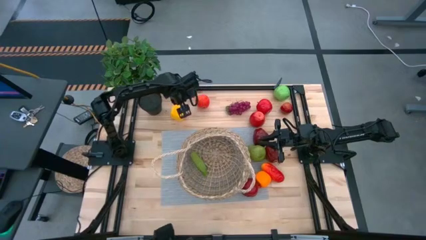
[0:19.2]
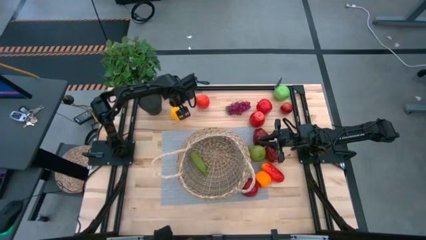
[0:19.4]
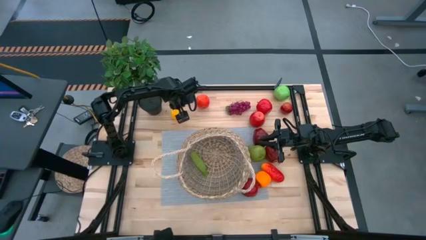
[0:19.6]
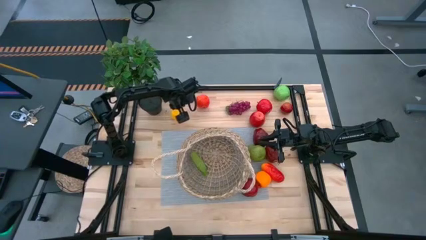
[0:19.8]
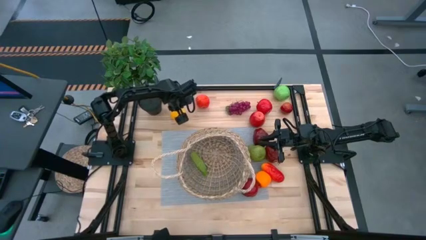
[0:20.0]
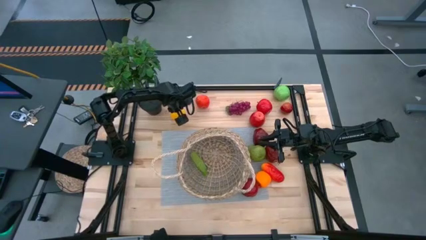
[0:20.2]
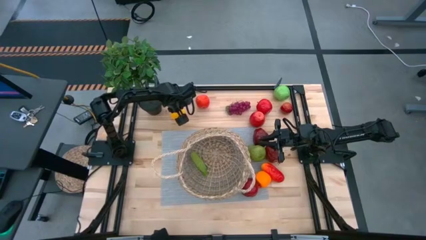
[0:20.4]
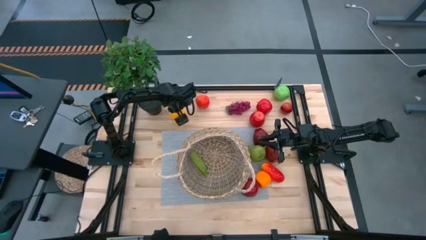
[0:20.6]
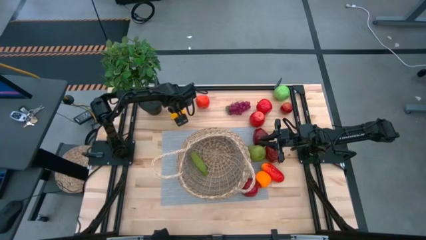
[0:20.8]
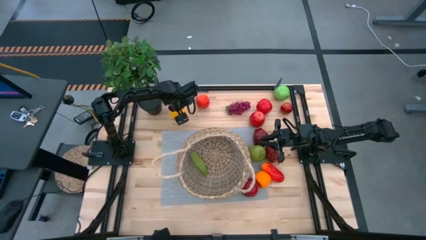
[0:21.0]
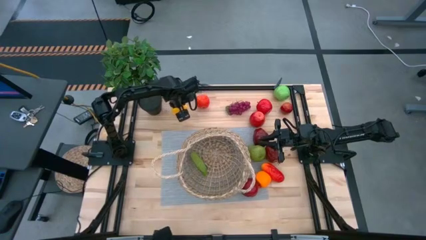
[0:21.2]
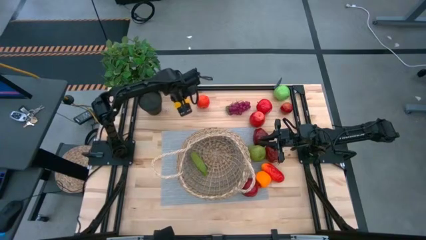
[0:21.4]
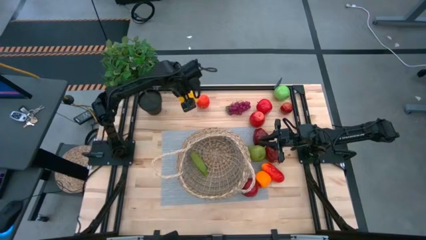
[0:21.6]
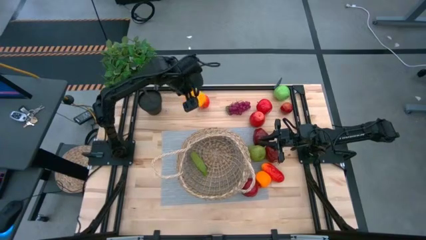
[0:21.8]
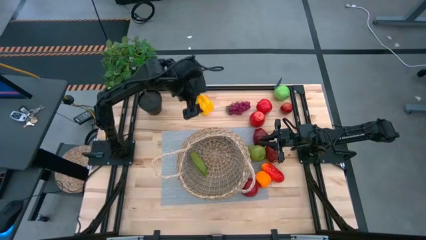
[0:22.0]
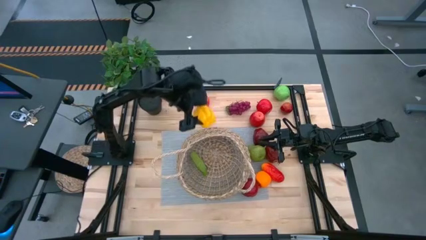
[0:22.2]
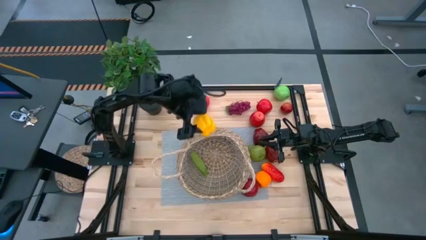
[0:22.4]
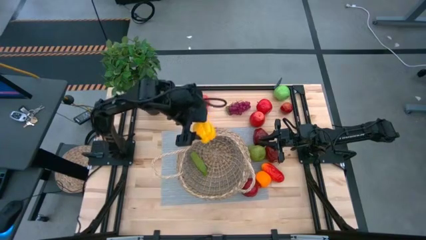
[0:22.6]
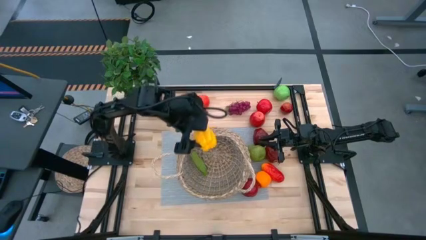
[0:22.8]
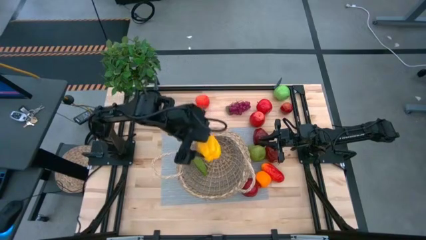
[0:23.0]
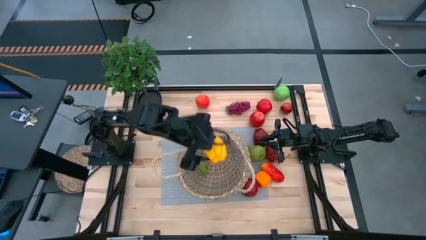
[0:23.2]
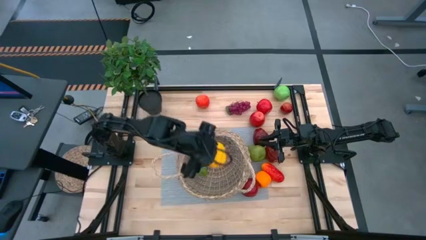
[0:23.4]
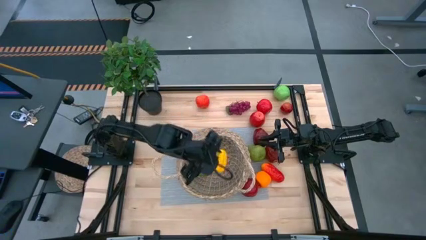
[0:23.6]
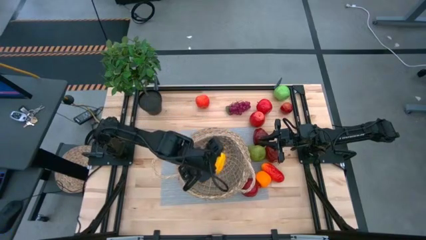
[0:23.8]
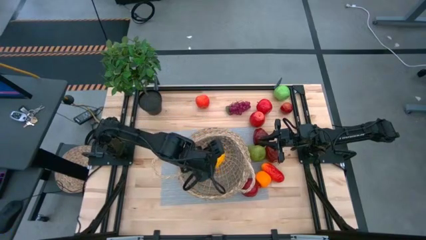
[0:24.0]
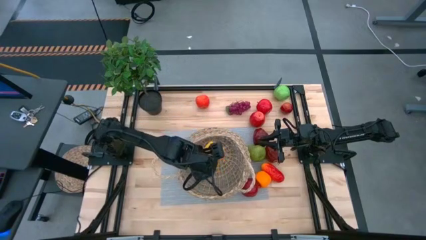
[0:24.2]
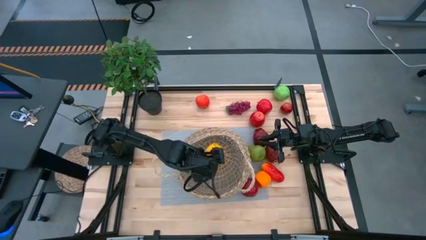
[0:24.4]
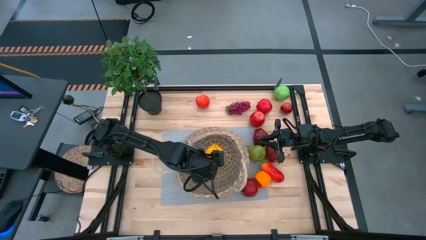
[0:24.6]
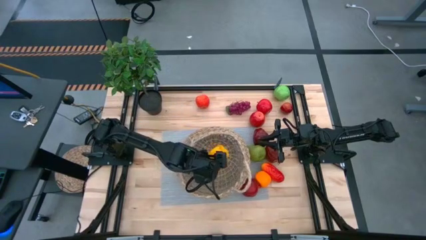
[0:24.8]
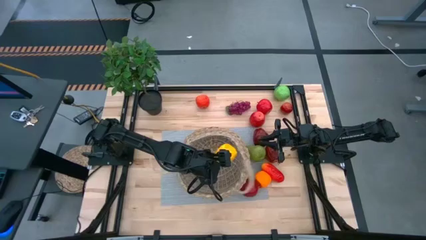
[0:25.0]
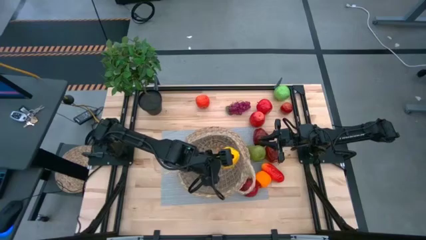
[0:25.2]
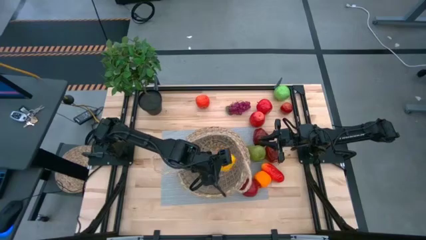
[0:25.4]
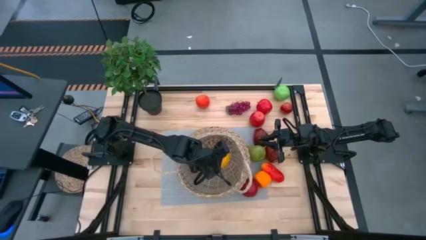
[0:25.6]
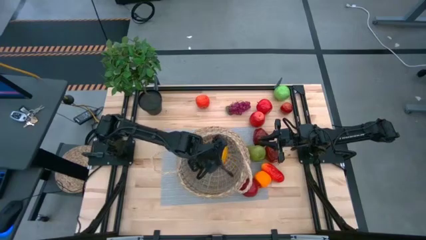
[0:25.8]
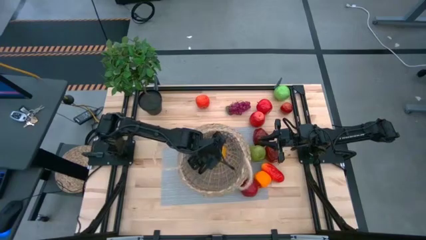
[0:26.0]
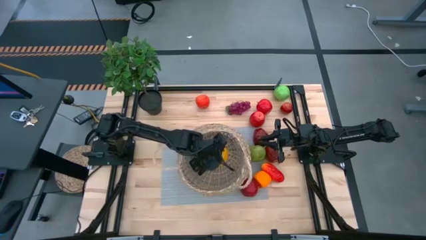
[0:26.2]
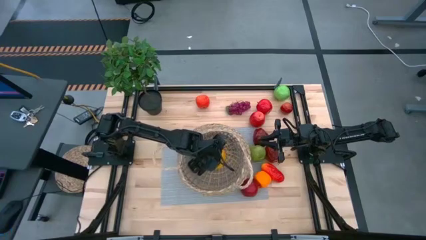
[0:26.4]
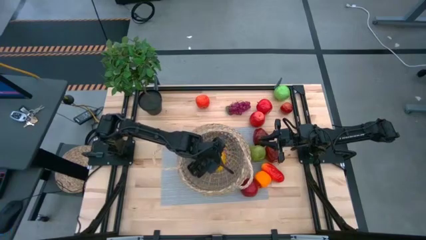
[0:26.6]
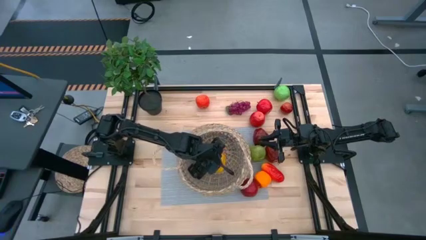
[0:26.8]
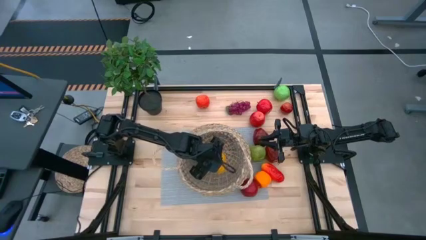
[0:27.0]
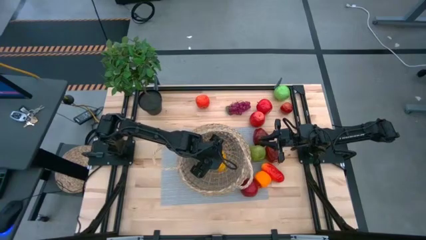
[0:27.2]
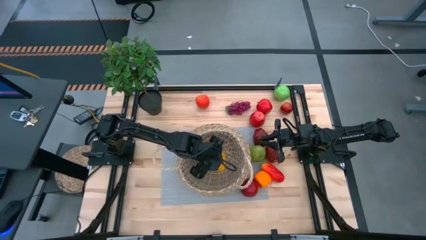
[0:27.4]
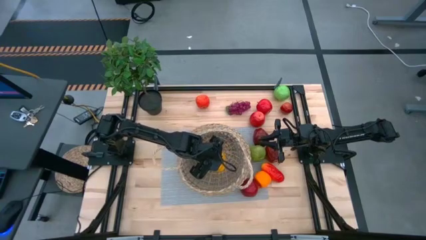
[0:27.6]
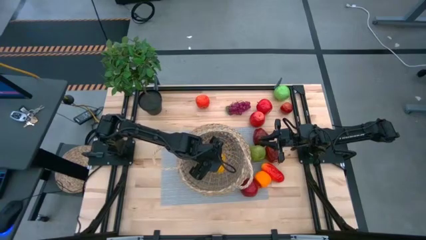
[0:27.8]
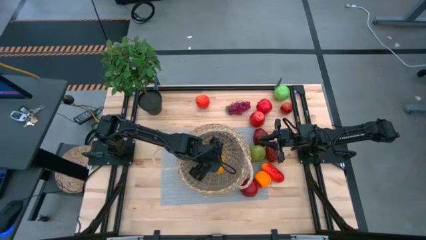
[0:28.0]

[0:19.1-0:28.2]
Task: Build produce basket
Put the bell pepper into the basket

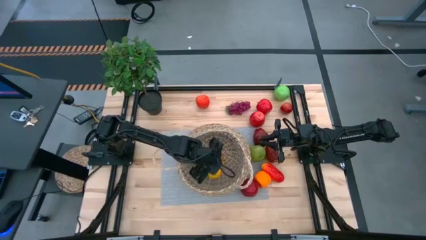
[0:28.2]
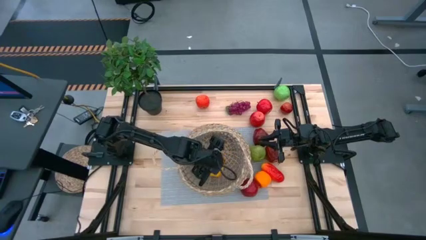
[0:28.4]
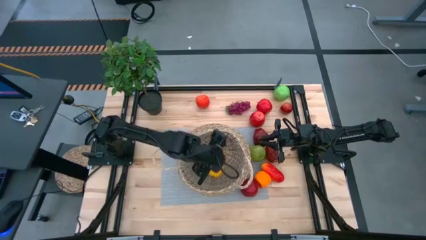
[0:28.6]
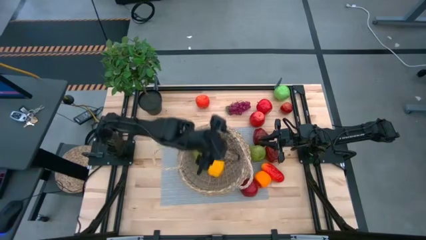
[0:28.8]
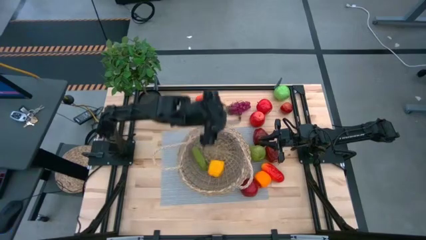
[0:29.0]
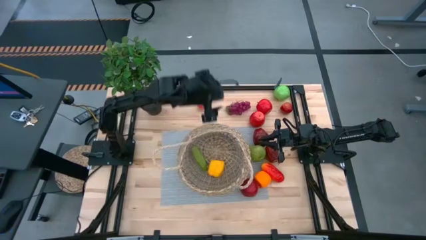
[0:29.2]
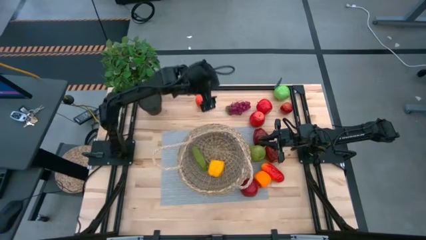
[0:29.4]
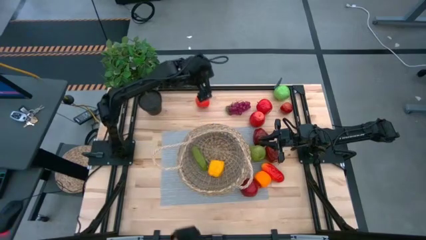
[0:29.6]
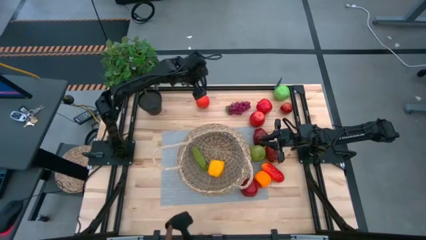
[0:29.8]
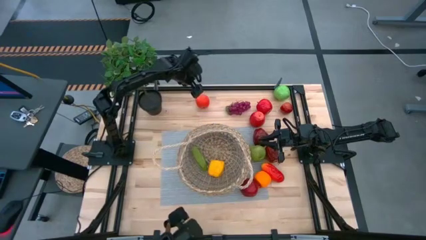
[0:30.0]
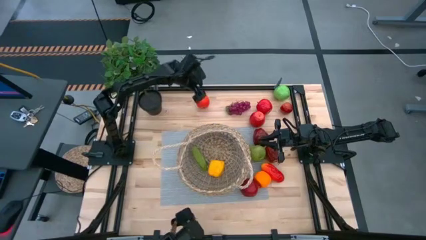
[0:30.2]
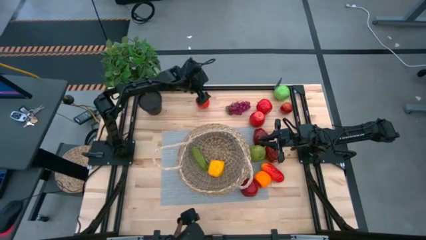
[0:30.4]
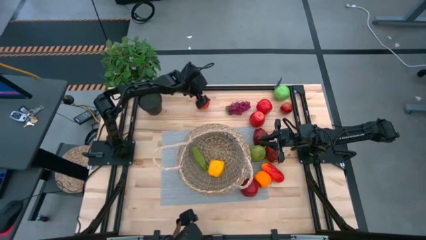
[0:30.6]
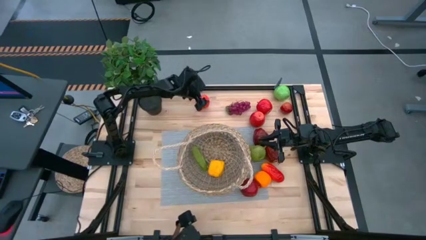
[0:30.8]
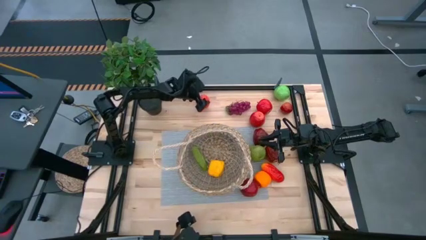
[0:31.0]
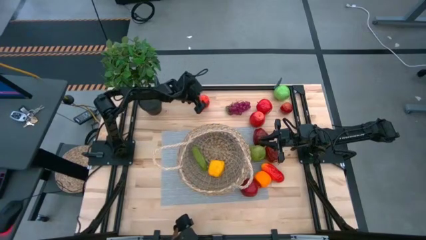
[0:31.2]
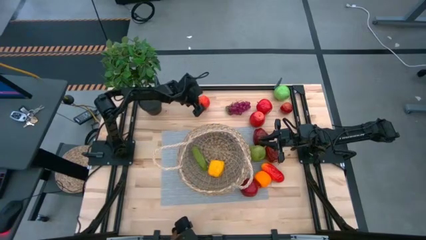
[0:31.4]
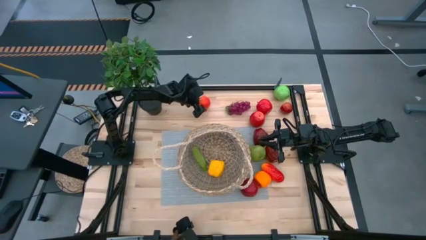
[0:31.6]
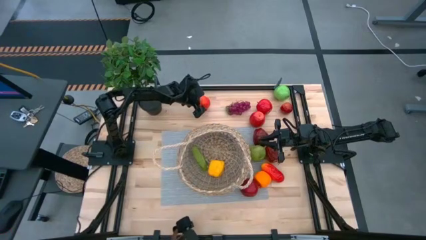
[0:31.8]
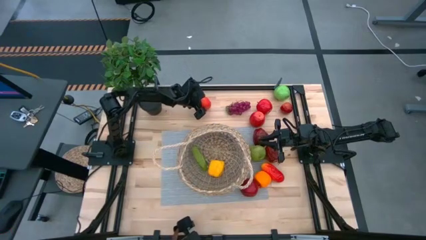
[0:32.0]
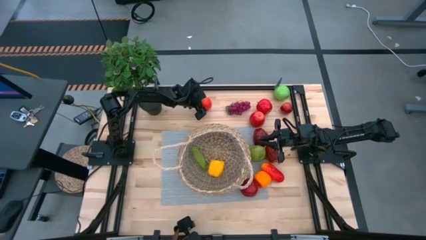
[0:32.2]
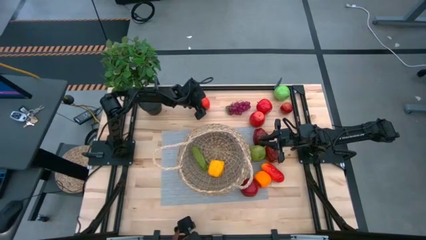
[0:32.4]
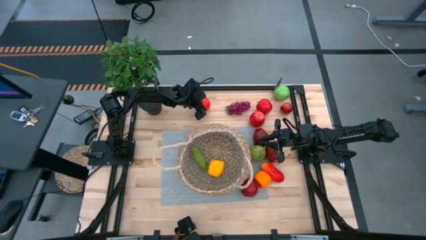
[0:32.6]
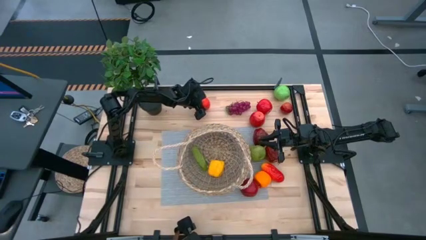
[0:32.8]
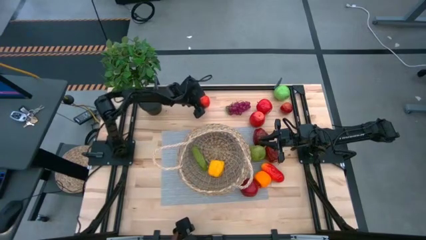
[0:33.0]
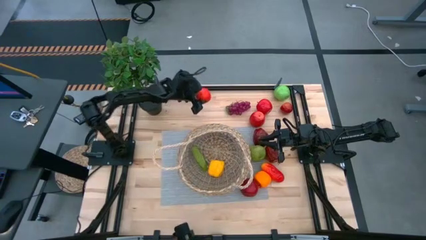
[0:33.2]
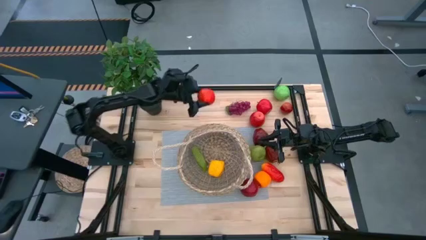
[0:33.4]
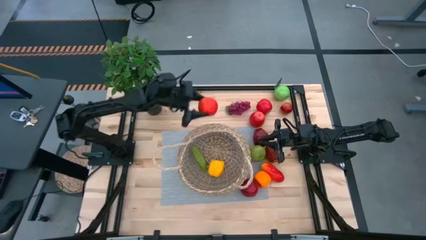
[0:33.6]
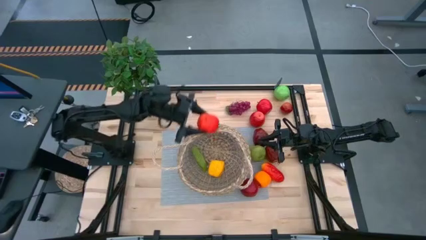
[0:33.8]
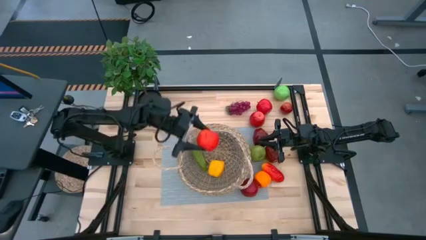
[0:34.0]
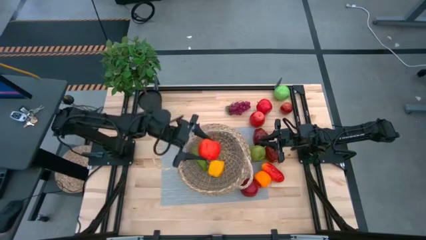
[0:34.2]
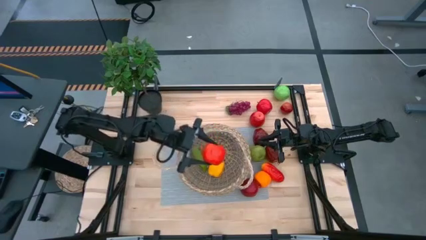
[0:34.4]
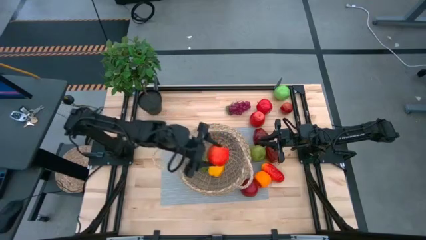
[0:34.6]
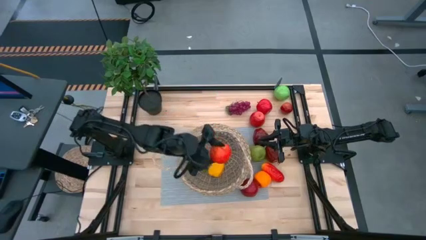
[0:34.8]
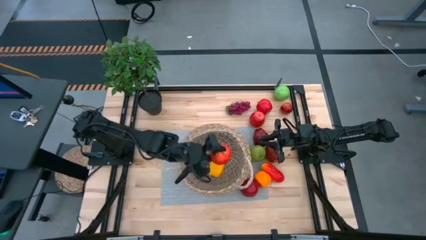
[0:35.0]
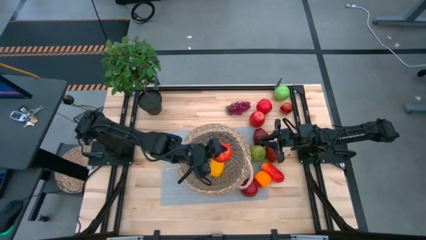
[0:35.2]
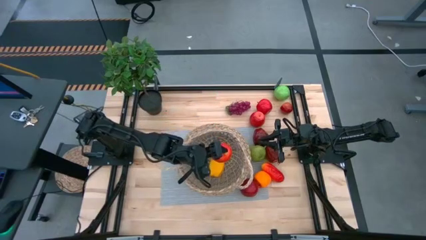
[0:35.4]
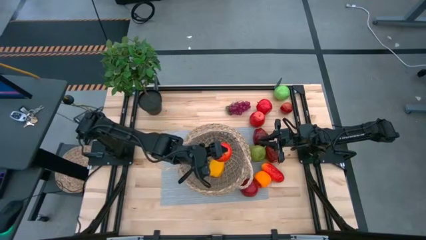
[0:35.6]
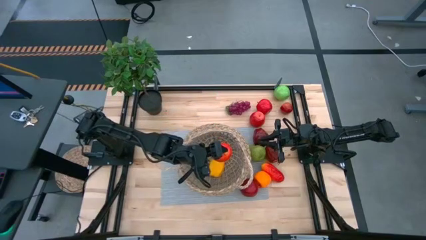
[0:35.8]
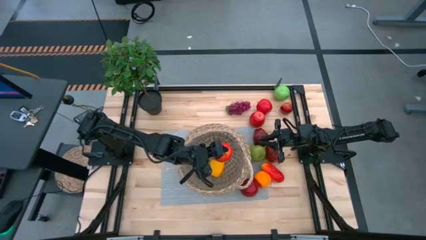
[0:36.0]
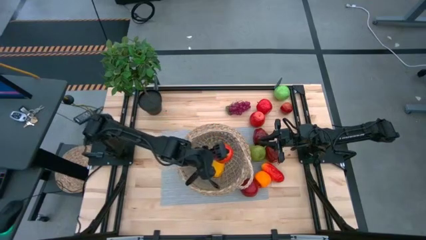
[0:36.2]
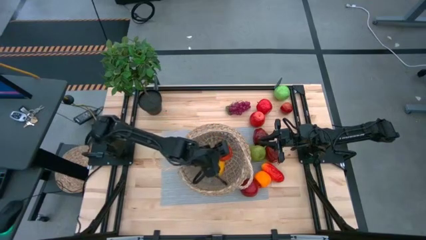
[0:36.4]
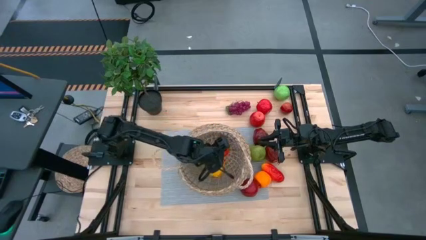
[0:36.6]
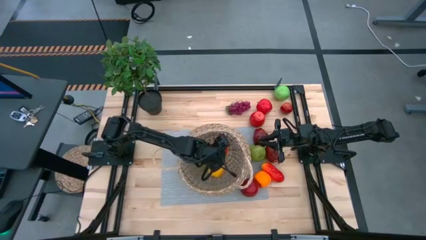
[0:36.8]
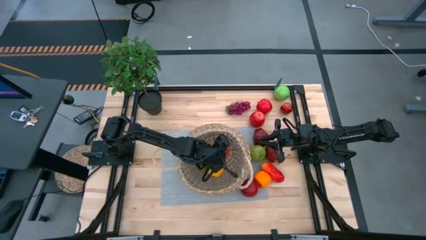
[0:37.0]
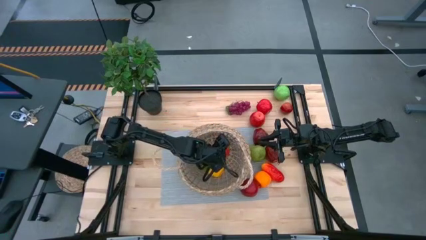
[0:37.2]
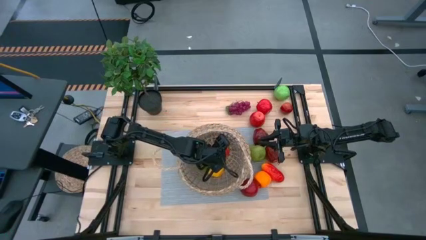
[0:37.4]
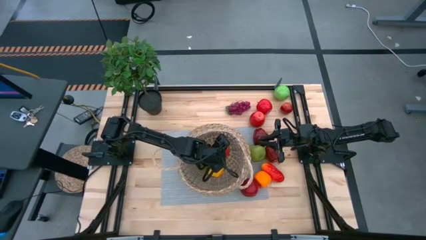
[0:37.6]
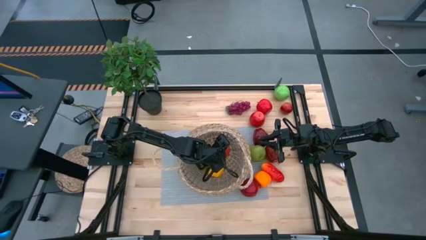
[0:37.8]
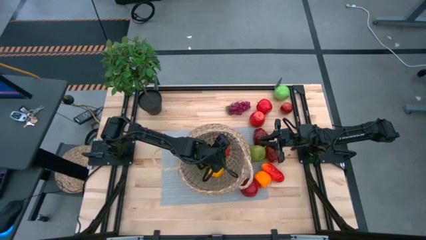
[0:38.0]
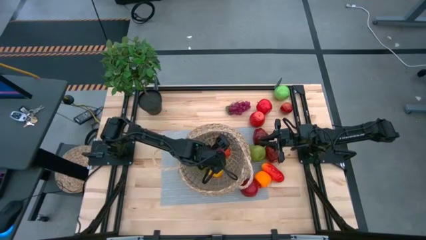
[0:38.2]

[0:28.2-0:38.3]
Put the left red apple into the basket
